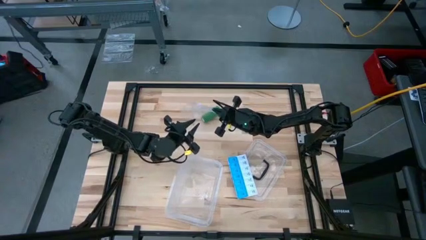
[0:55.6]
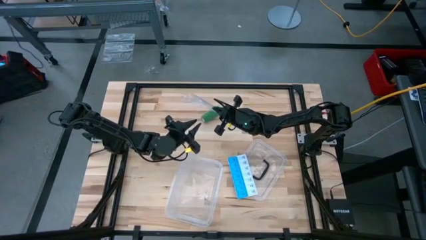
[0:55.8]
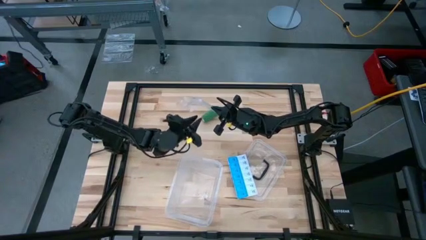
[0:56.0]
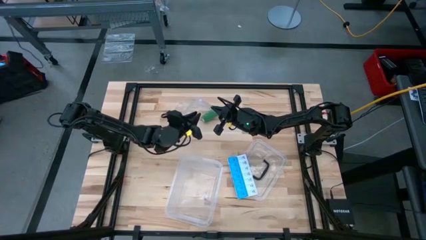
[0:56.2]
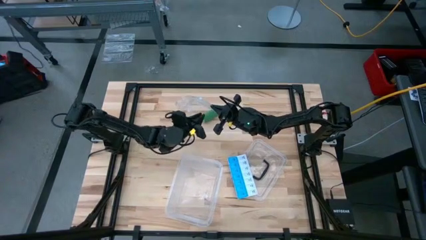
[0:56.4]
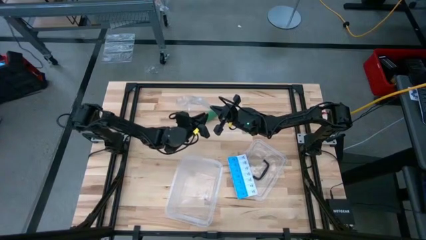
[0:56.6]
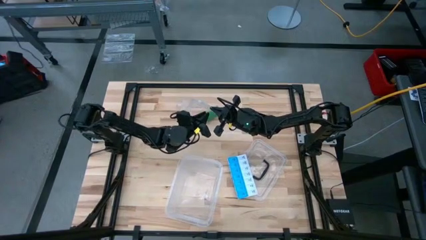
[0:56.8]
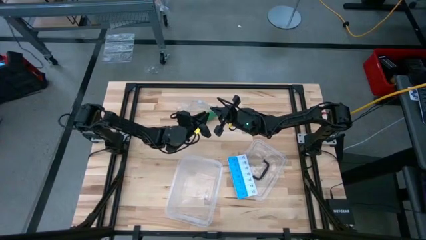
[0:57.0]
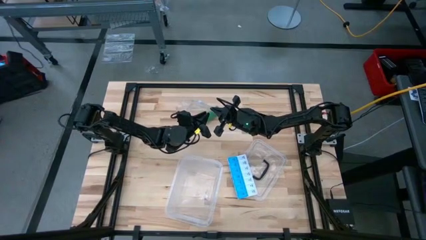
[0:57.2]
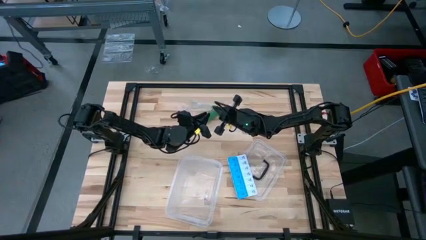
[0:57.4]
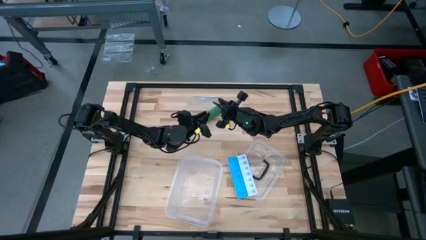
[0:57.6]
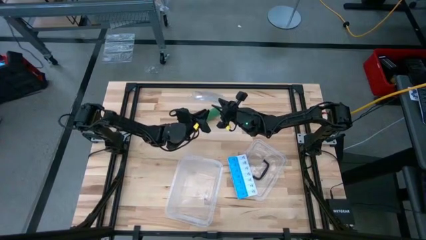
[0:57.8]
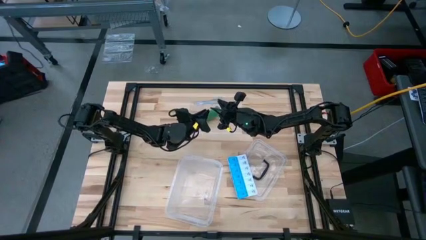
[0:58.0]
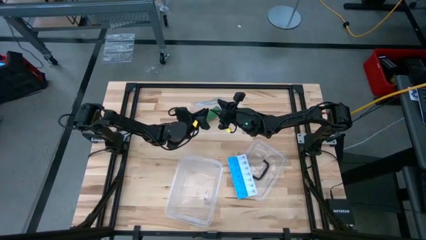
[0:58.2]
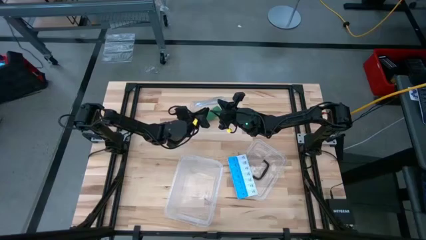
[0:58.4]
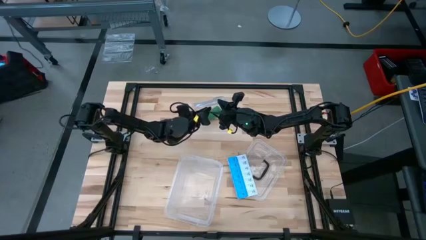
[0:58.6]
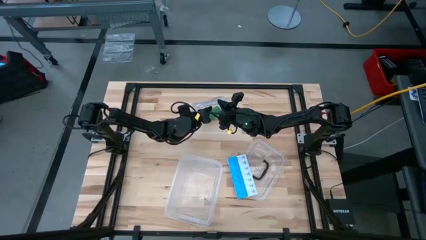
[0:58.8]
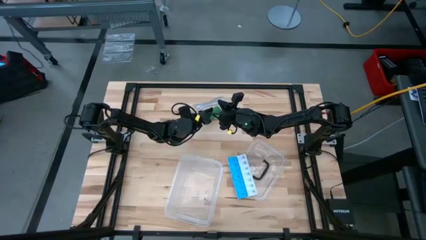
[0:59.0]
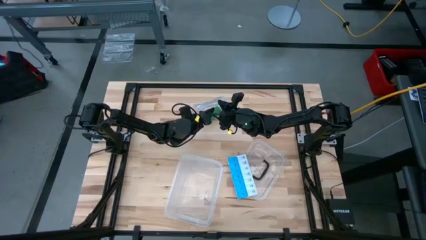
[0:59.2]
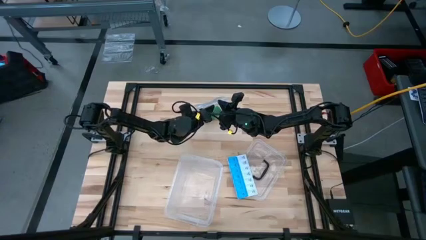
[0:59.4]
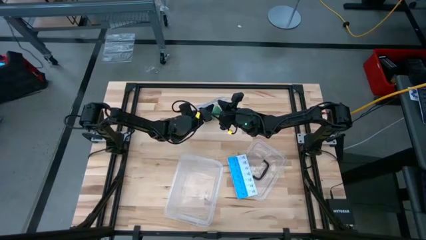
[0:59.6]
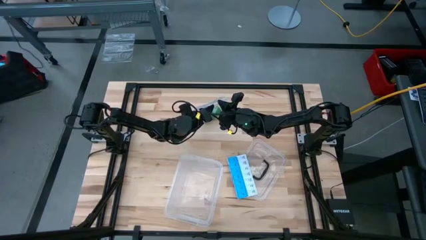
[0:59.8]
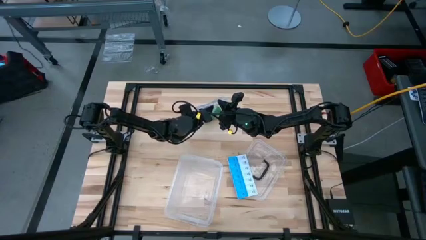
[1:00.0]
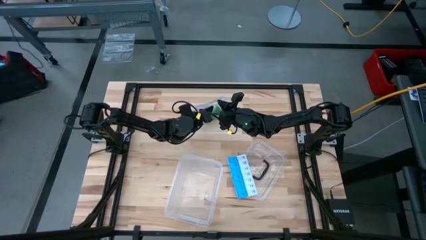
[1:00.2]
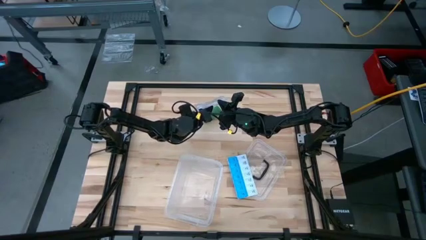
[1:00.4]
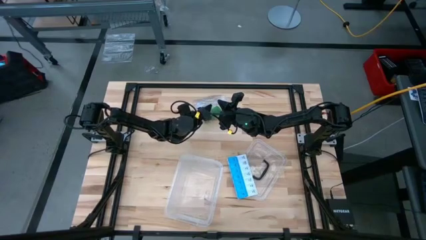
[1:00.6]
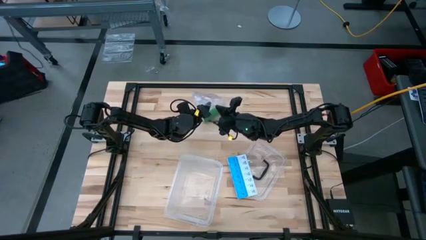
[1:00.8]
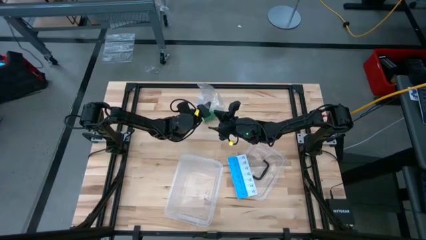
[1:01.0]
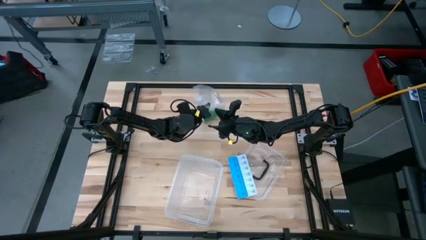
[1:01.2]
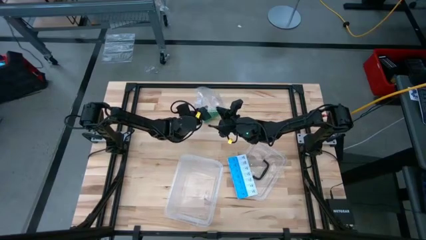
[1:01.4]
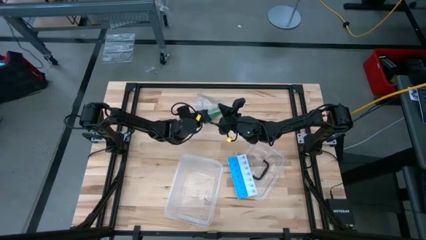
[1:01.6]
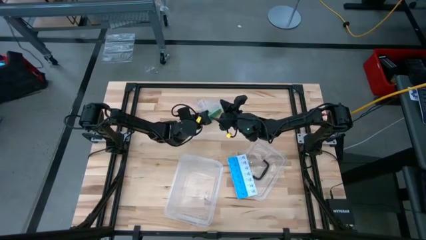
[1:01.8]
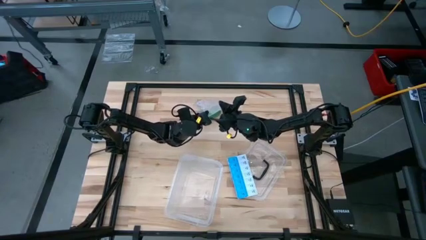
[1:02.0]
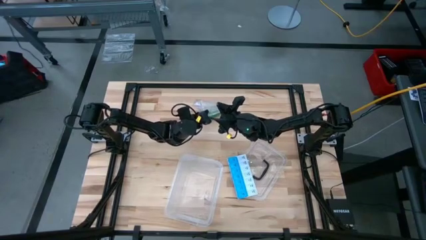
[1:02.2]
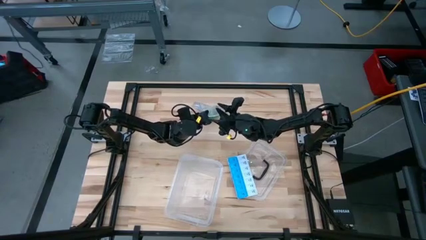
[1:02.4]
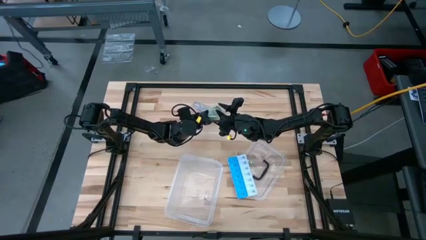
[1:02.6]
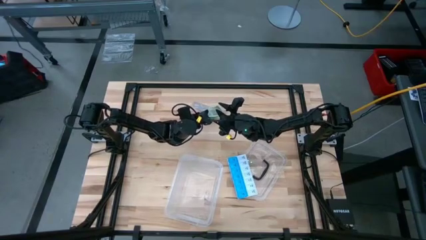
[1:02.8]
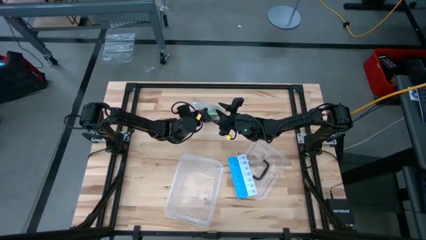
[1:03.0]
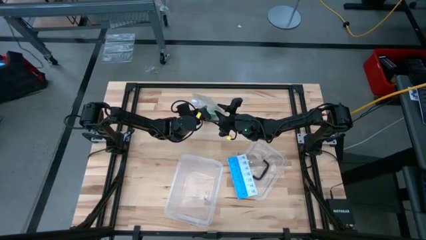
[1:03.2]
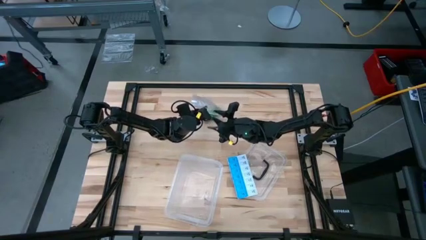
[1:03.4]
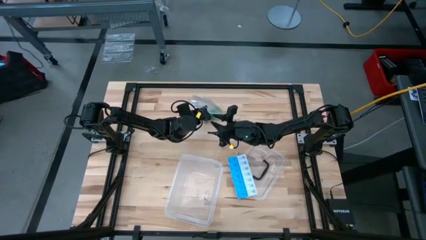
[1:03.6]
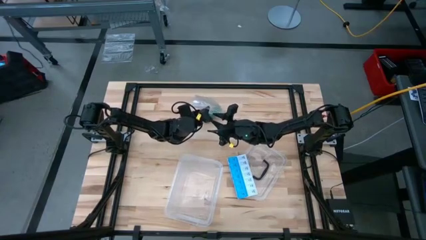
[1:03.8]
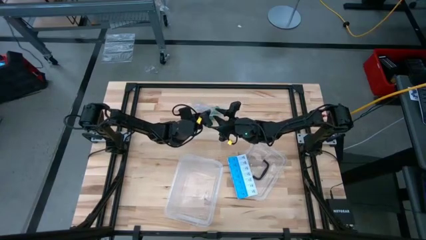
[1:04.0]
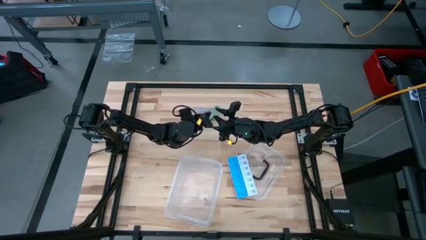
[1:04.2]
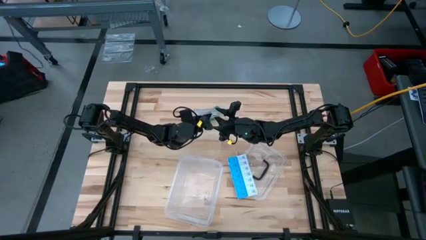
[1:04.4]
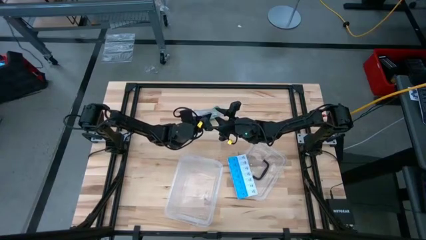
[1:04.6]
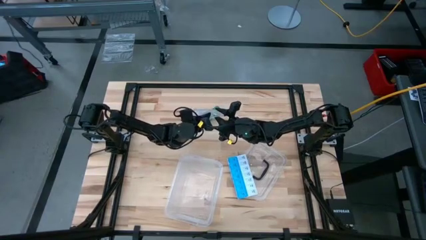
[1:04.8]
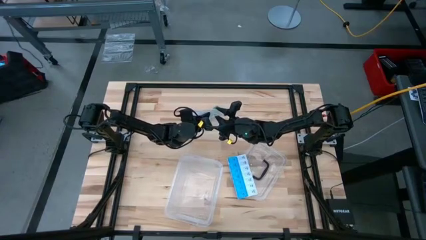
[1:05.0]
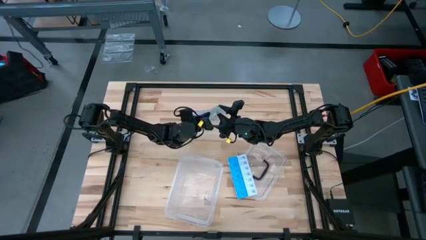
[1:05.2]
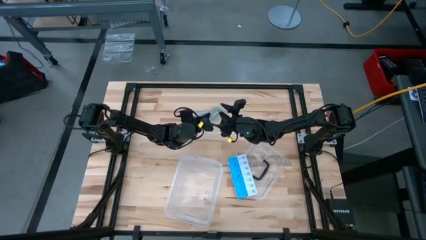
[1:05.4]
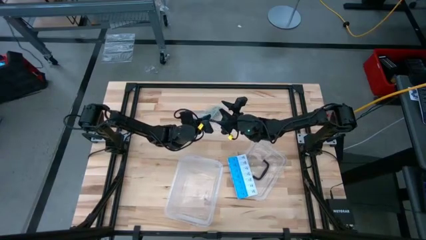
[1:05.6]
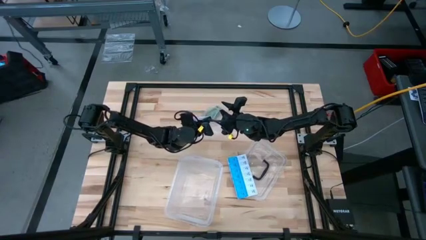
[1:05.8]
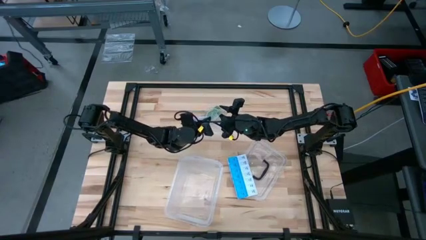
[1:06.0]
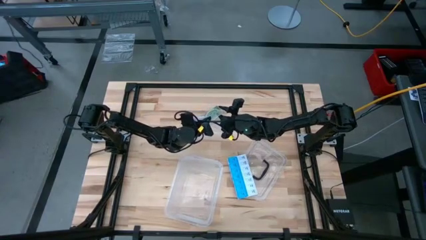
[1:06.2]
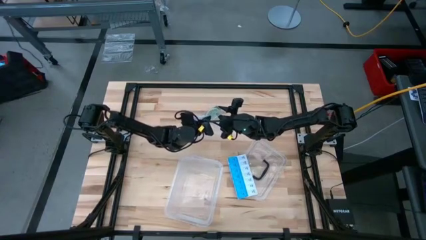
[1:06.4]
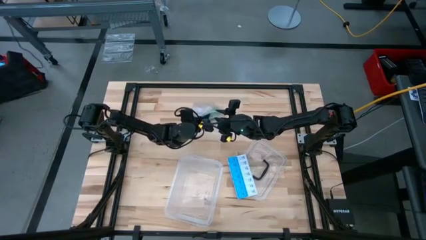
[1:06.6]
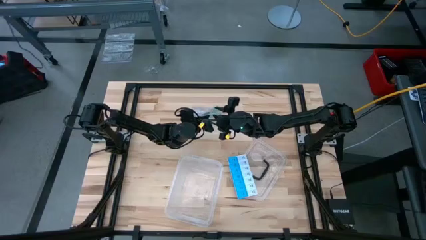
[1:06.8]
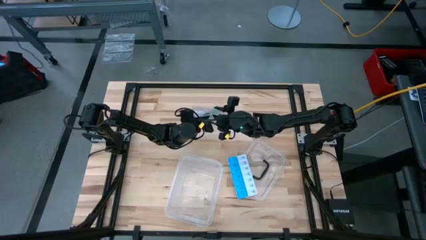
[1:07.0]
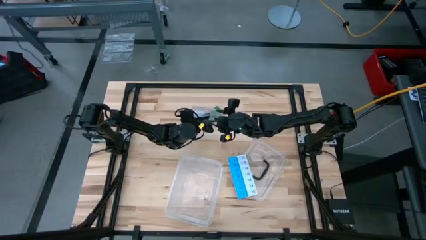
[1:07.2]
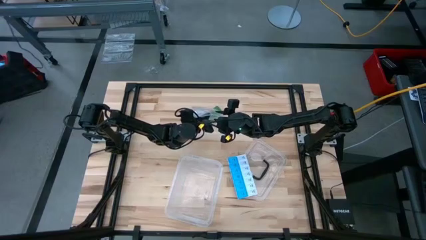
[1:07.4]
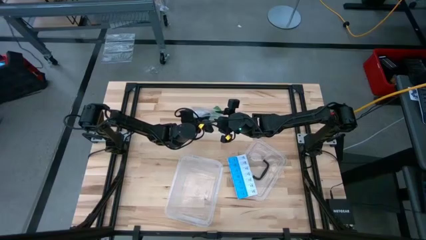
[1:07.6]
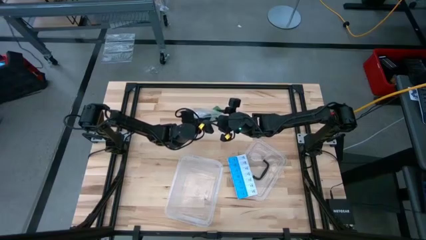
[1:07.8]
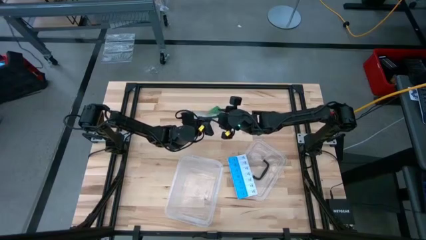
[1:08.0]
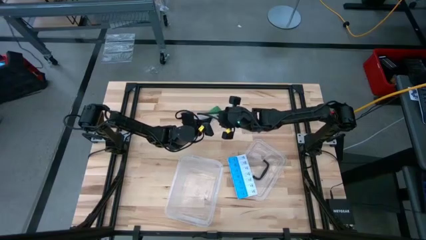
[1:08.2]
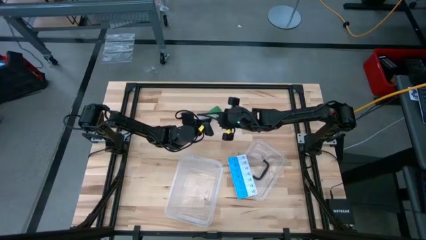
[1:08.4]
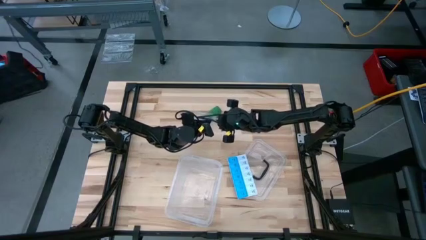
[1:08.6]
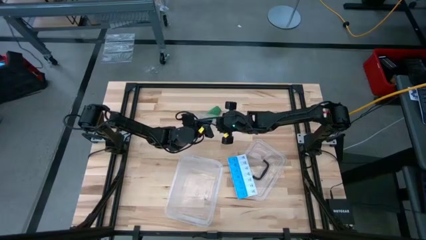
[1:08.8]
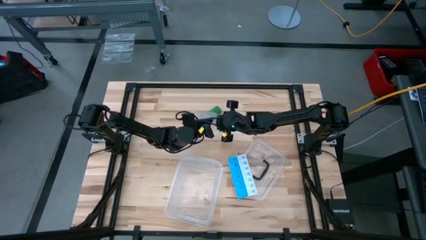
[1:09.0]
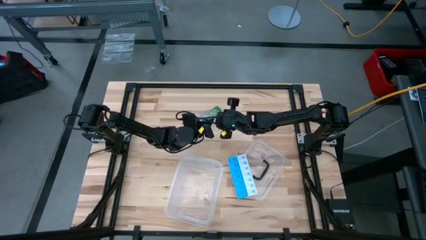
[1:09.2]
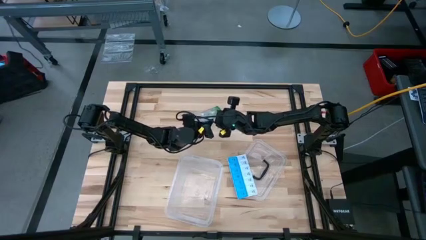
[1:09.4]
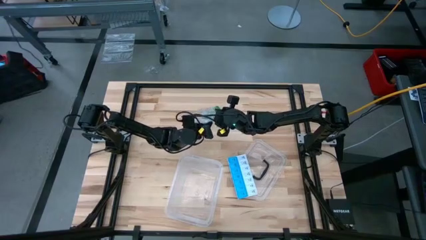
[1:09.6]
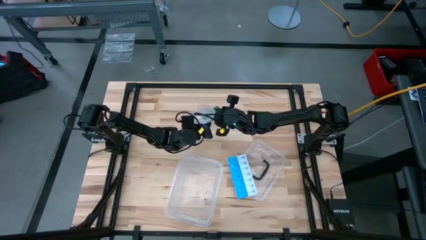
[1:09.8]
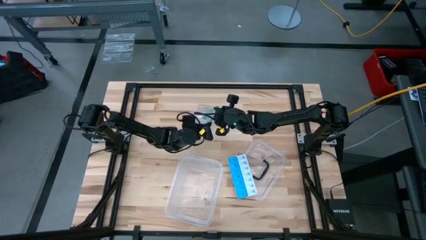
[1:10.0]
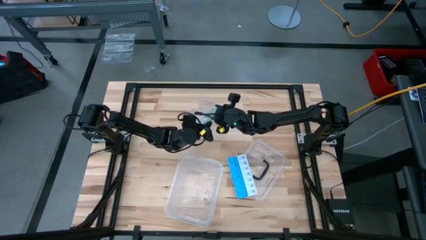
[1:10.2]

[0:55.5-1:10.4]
Task: Roll bandage
Prepare the transparent zip bag

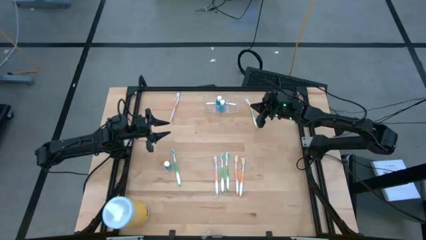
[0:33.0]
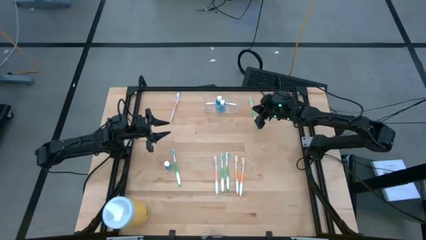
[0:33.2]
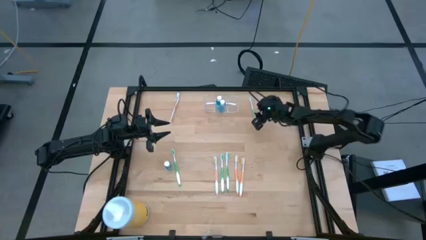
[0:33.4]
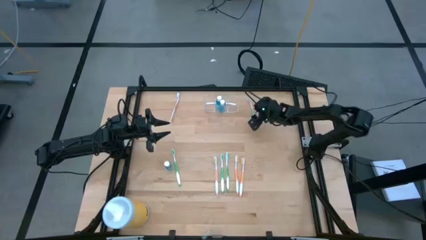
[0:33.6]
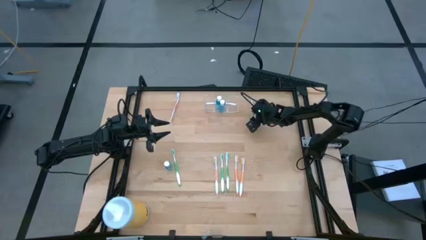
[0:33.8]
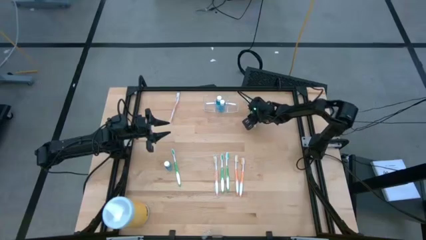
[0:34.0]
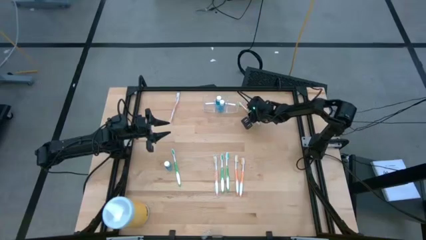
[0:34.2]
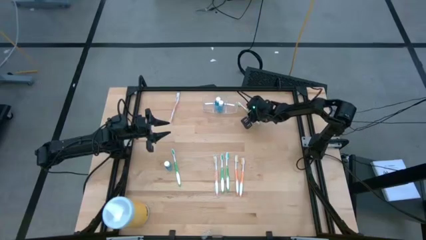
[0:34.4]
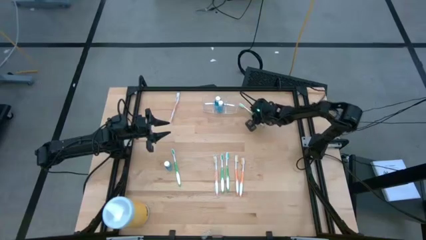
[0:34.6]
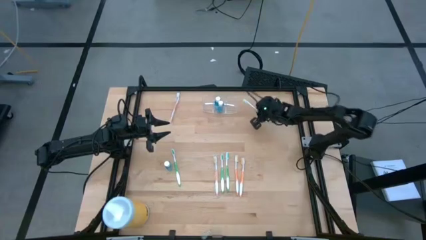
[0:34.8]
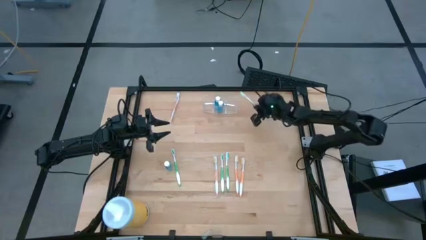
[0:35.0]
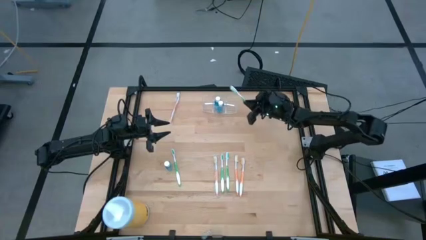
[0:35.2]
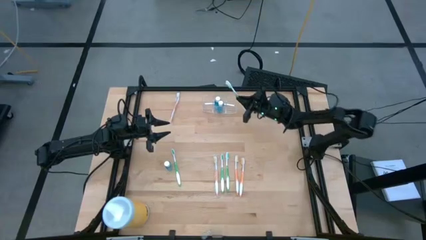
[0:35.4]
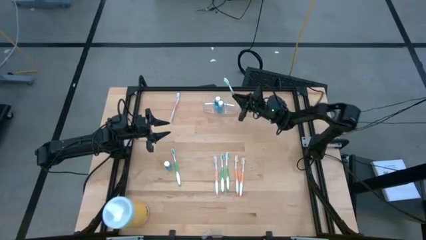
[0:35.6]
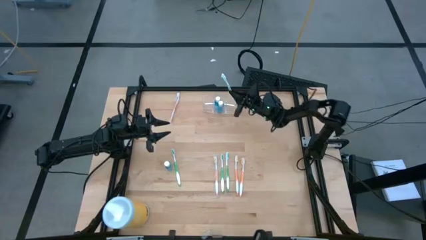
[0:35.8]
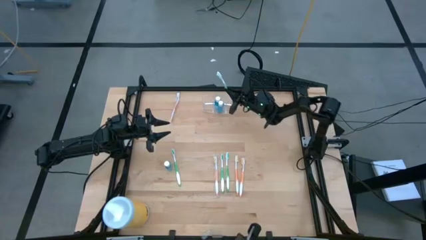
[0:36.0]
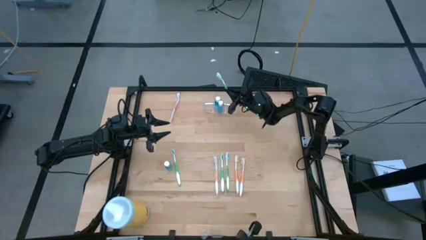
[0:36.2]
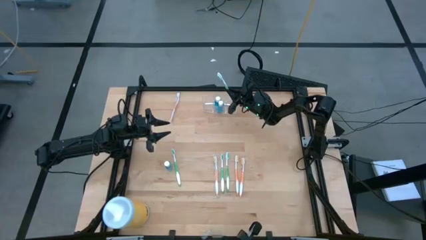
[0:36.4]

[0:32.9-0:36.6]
Task: Pick & Place toothbrushing station
Put the green toothbrush into the transparent organizer
